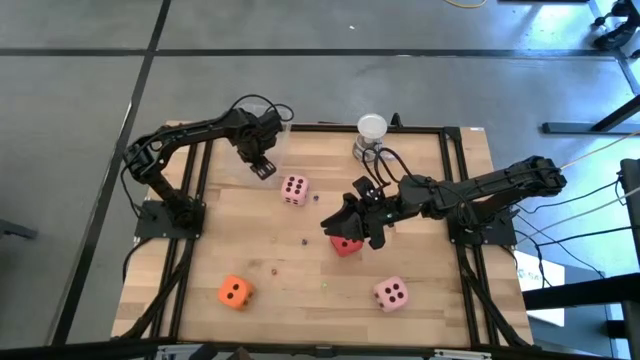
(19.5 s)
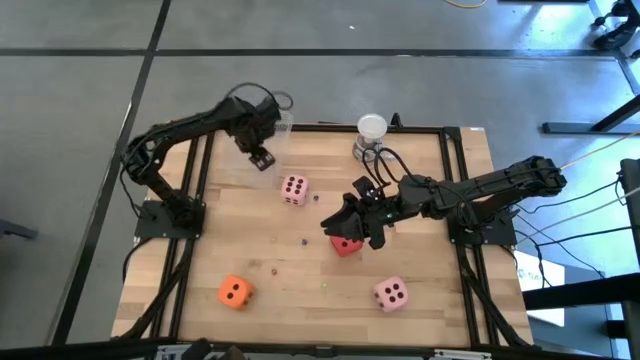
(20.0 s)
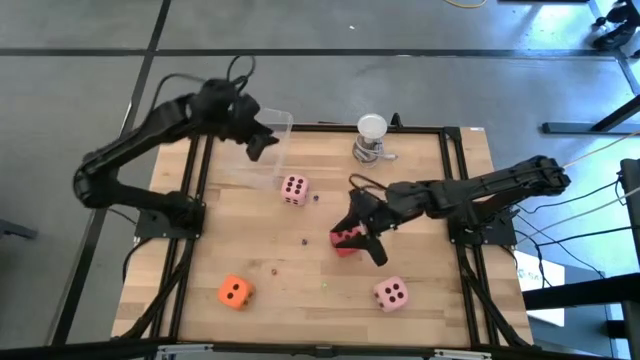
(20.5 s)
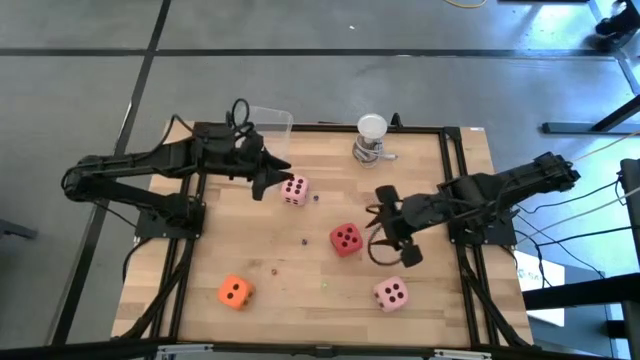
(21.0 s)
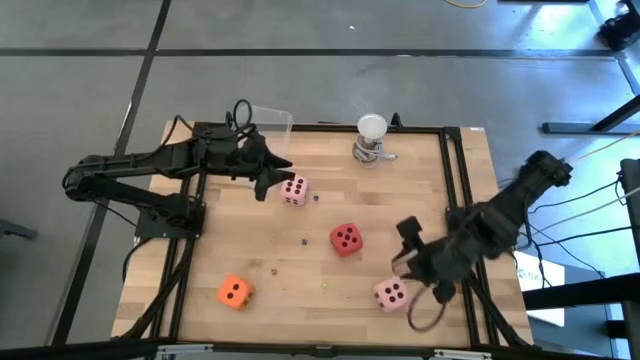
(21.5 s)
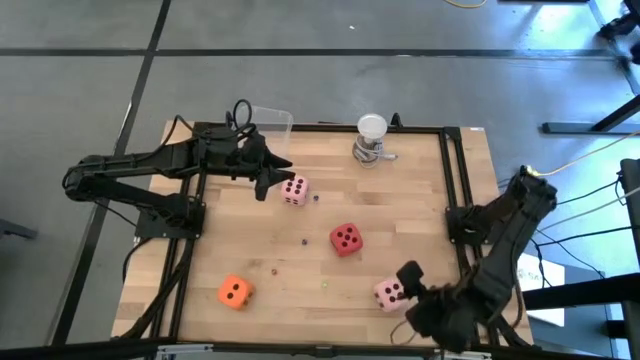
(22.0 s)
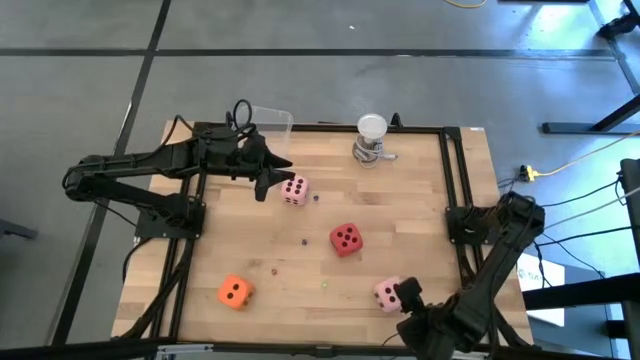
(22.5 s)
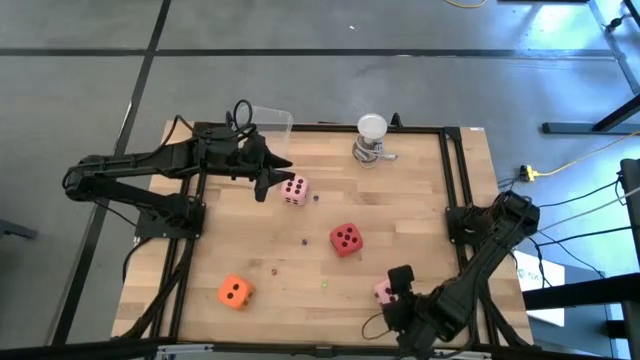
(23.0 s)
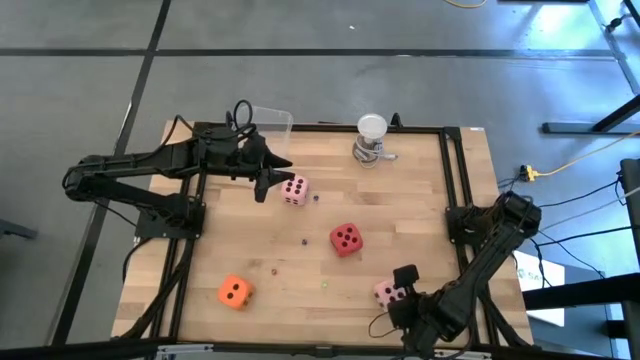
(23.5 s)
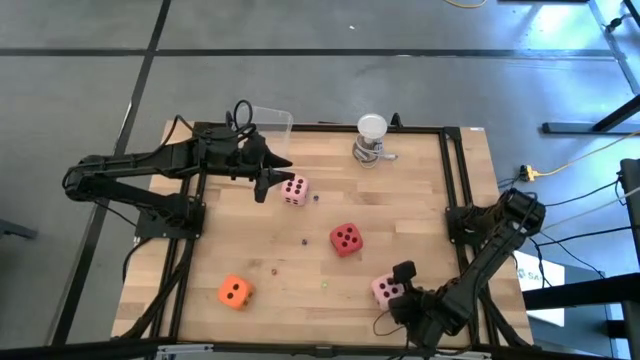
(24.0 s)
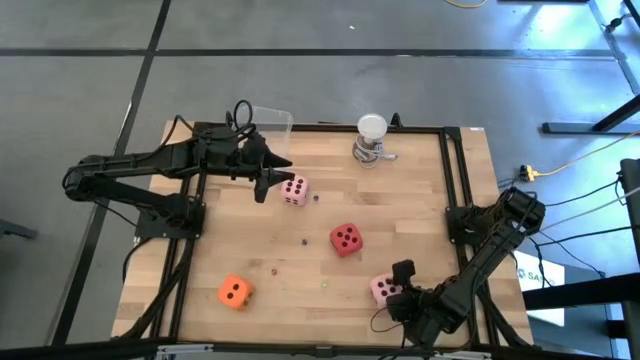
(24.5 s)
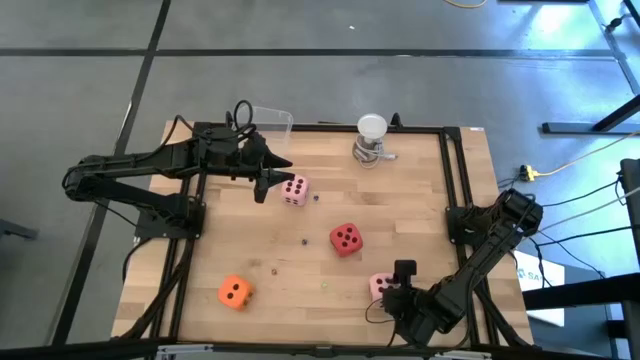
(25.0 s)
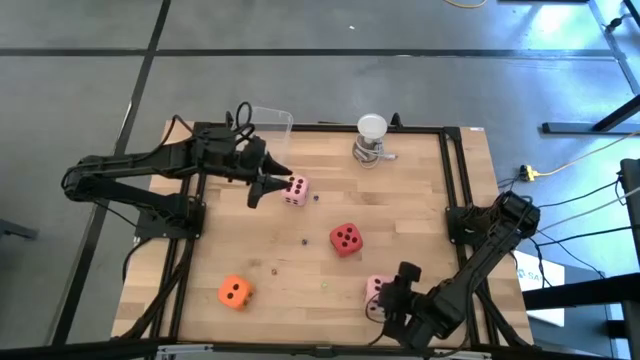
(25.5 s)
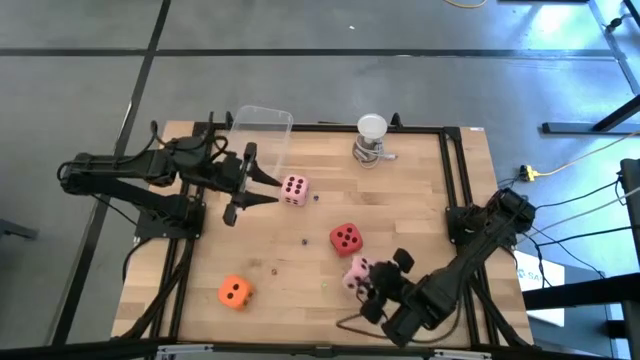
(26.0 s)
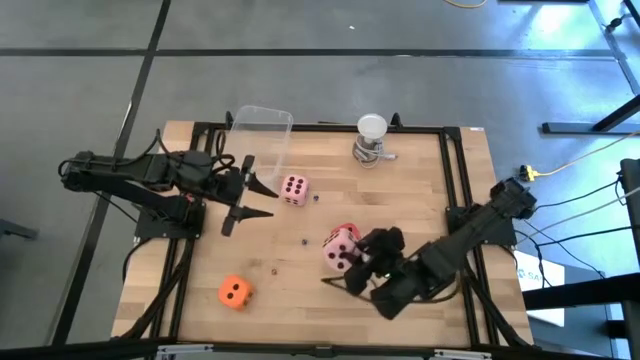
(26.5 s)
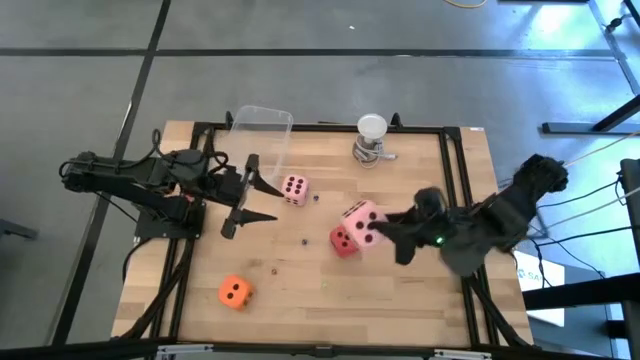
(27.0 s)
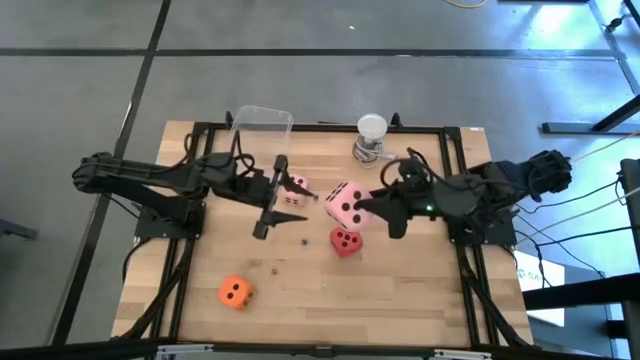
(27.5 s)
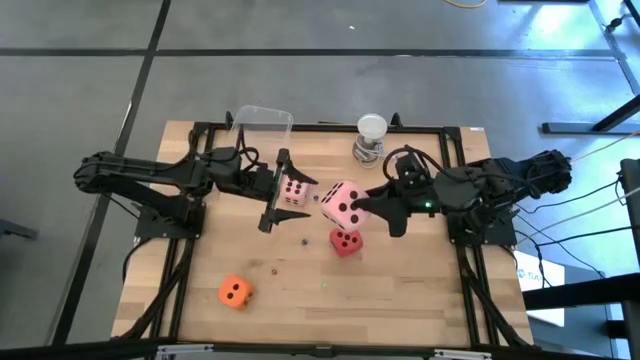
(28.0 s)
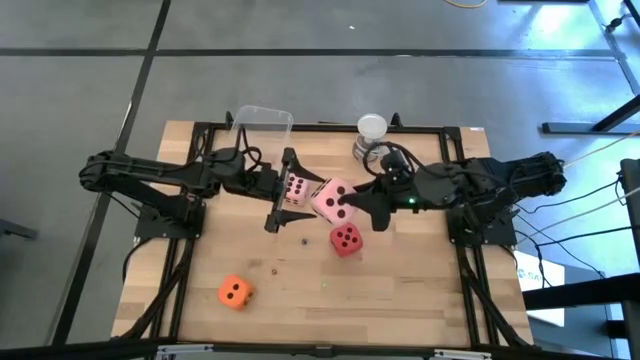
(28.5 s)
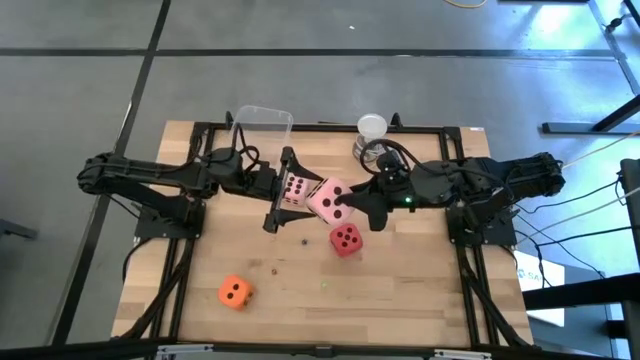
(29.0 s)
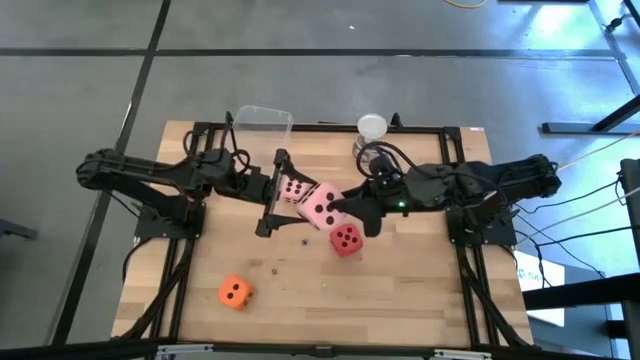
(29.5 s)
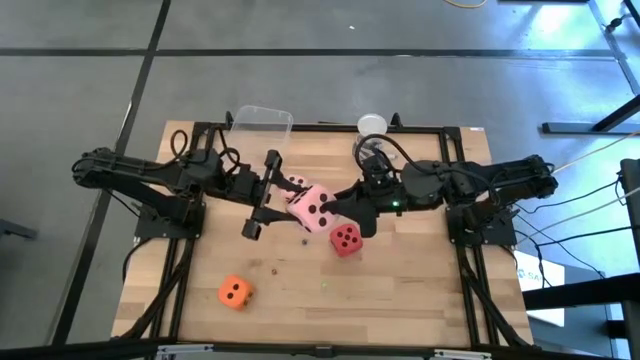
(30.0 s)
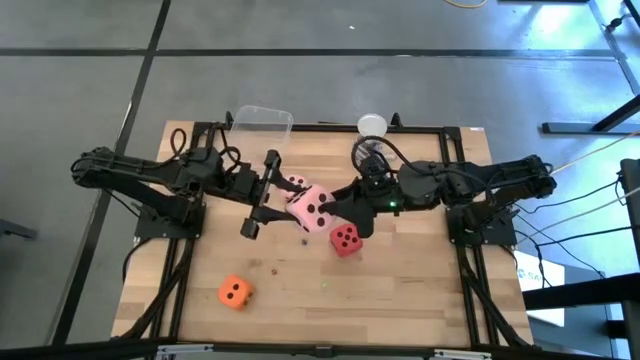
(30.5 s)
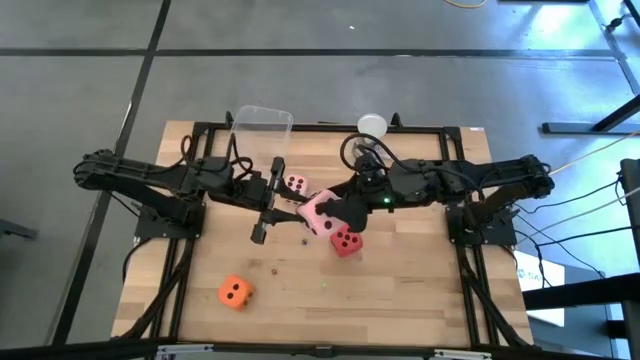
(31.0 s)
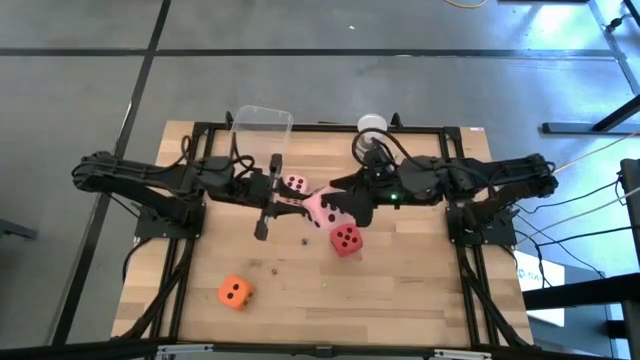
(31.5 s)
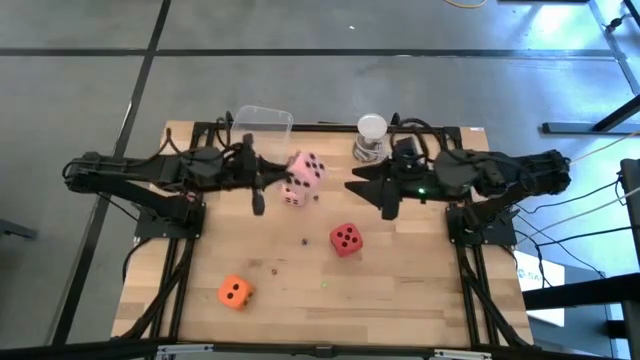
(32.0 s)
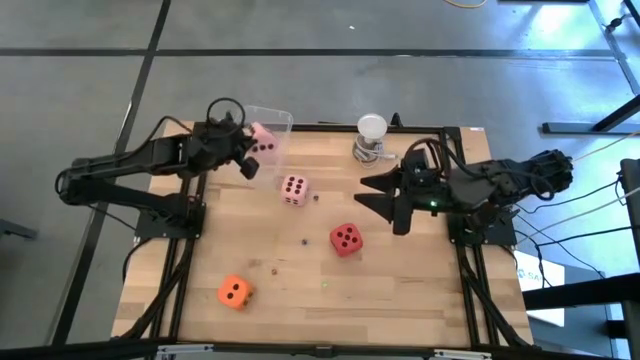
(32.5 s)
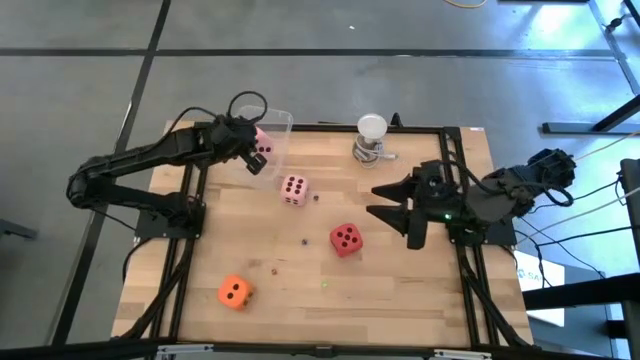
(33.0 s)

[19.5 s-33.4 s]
Task: Pick & Place Dice
Put the large pink dice into the transparent bin
